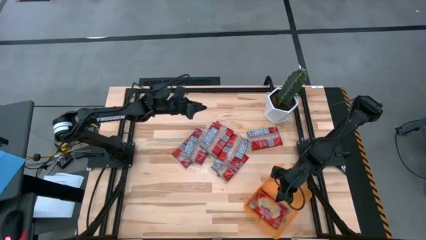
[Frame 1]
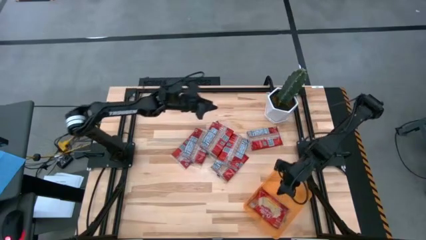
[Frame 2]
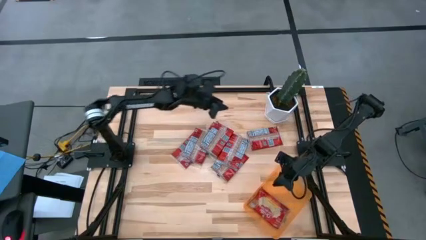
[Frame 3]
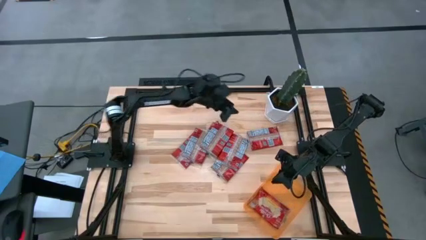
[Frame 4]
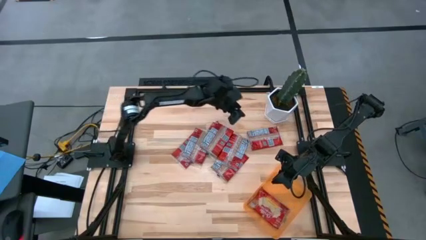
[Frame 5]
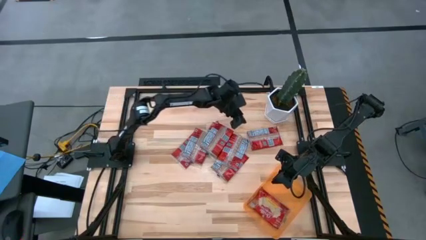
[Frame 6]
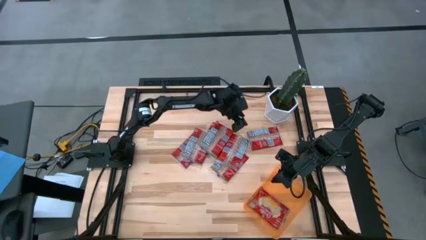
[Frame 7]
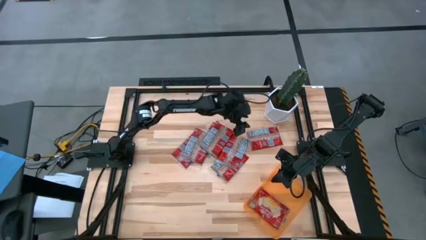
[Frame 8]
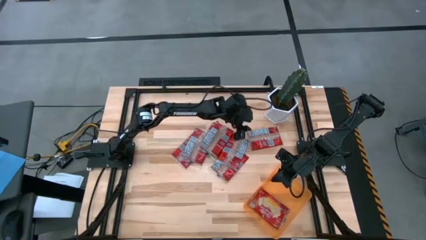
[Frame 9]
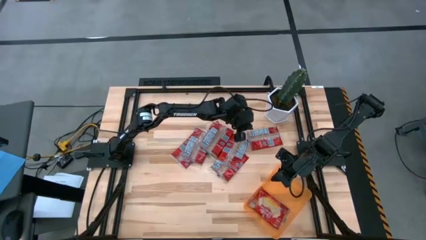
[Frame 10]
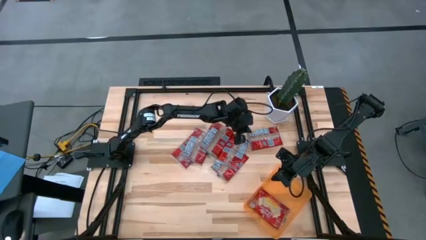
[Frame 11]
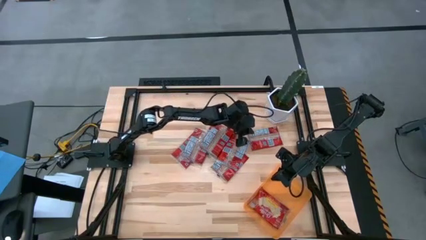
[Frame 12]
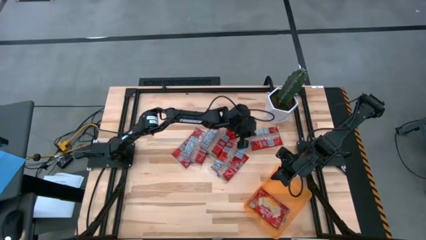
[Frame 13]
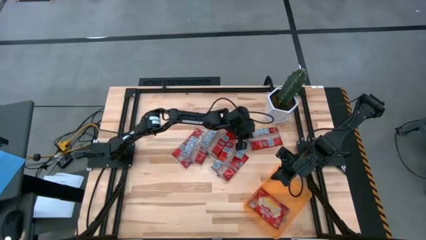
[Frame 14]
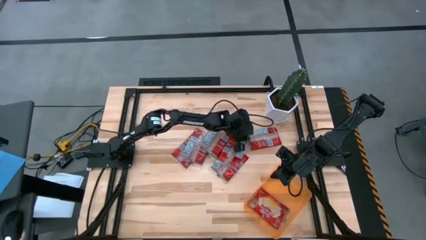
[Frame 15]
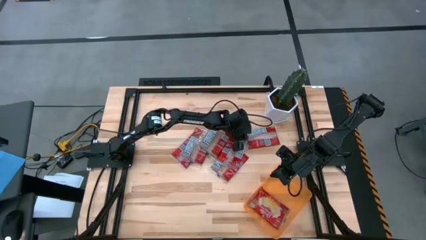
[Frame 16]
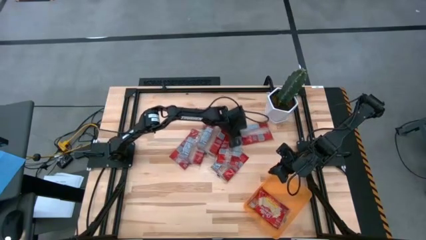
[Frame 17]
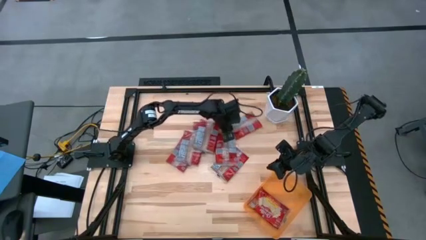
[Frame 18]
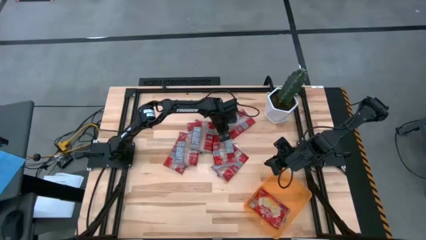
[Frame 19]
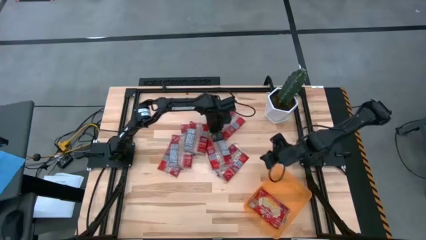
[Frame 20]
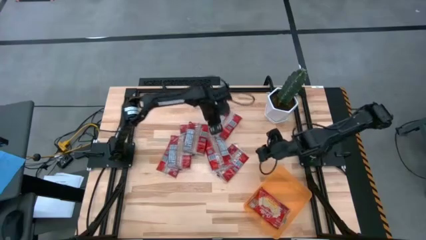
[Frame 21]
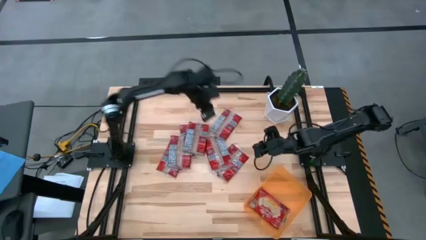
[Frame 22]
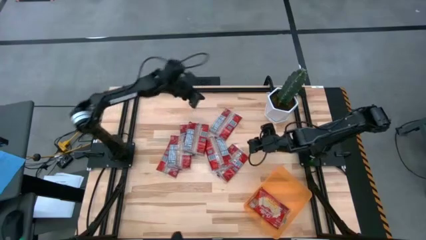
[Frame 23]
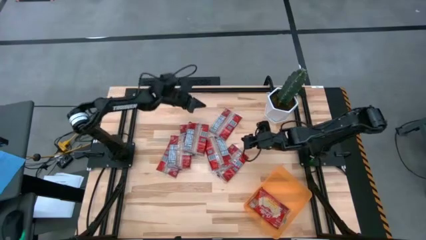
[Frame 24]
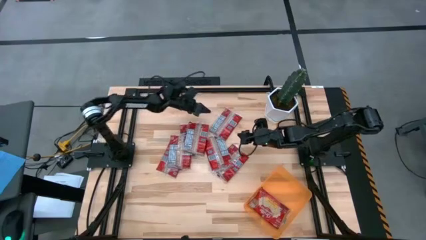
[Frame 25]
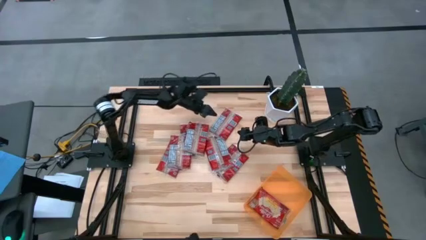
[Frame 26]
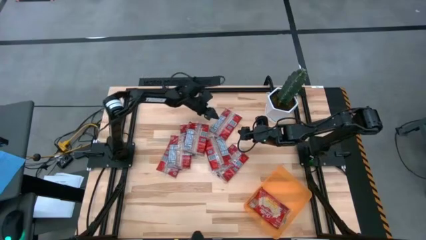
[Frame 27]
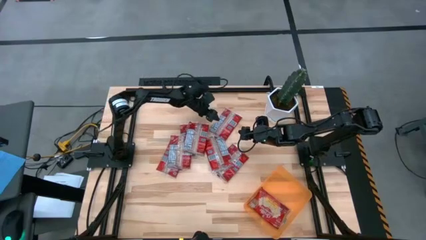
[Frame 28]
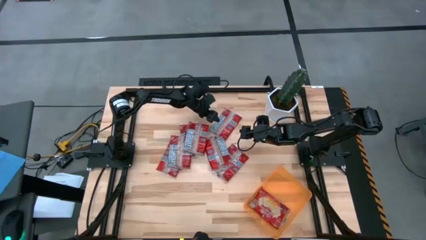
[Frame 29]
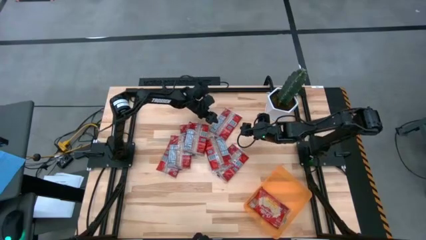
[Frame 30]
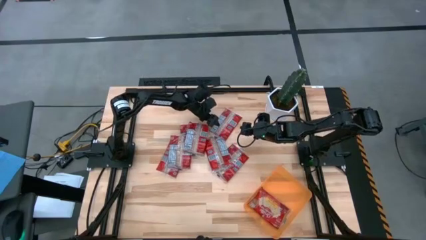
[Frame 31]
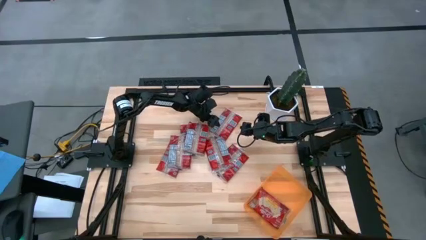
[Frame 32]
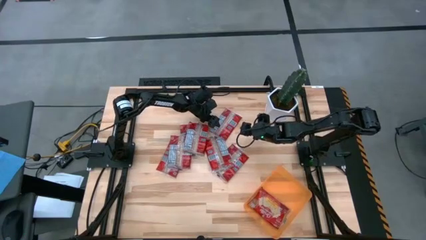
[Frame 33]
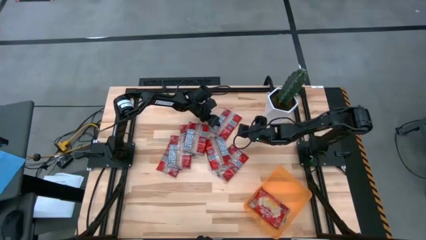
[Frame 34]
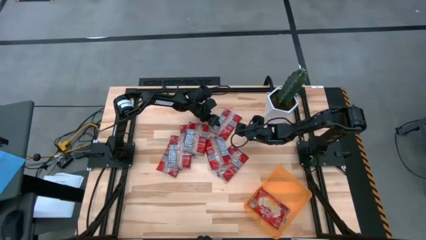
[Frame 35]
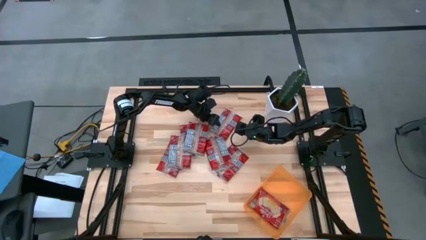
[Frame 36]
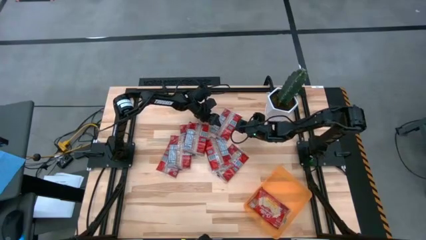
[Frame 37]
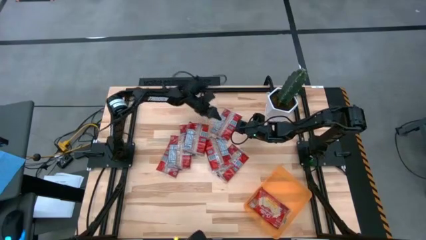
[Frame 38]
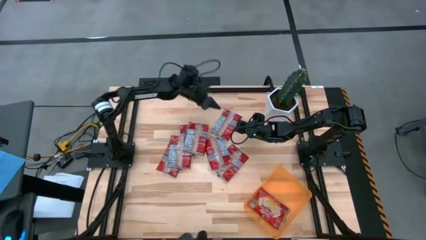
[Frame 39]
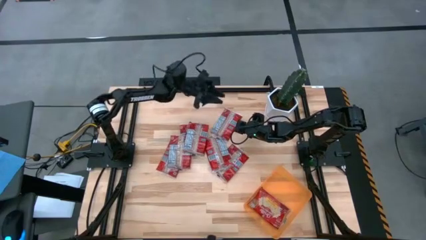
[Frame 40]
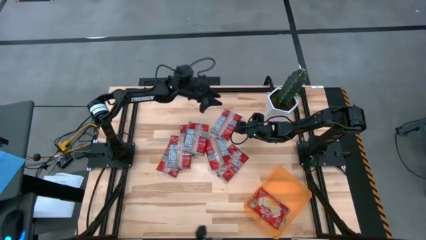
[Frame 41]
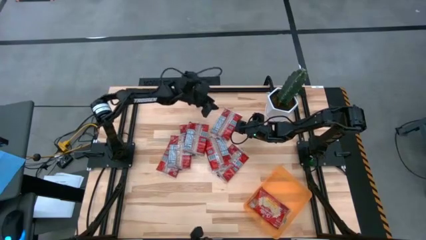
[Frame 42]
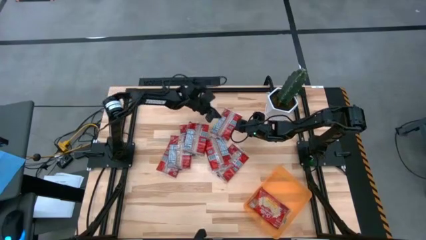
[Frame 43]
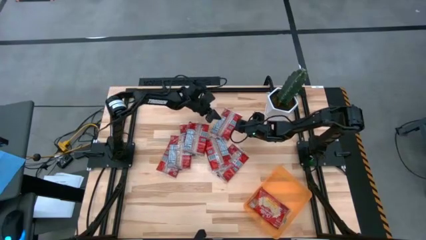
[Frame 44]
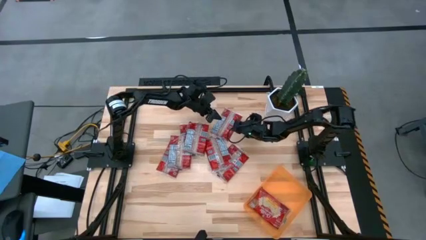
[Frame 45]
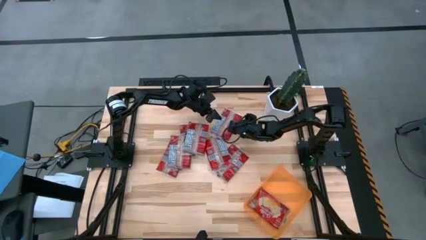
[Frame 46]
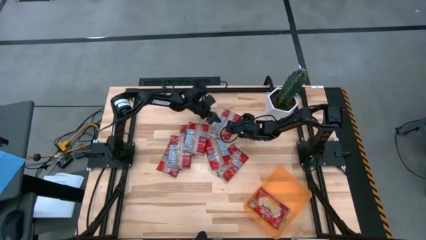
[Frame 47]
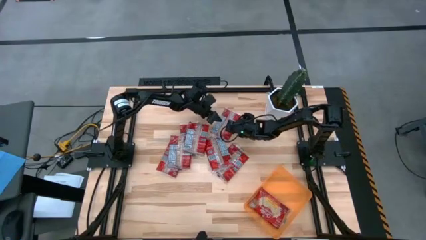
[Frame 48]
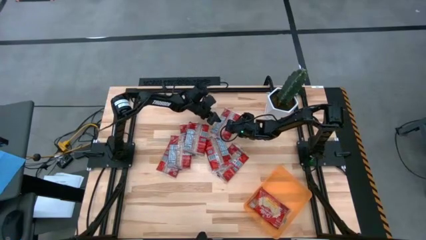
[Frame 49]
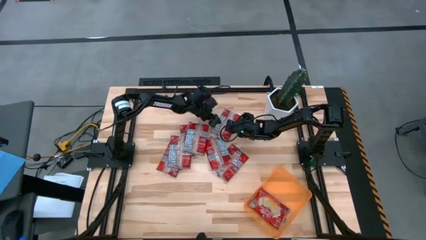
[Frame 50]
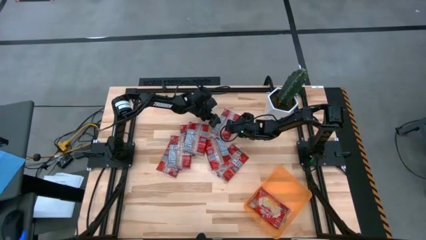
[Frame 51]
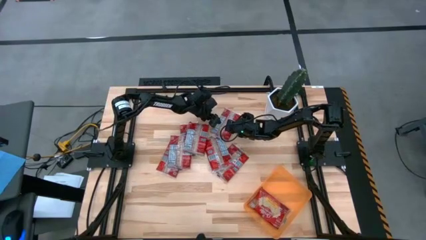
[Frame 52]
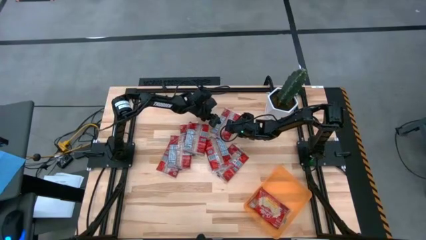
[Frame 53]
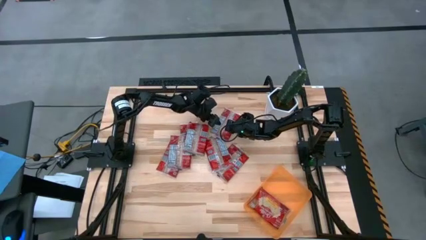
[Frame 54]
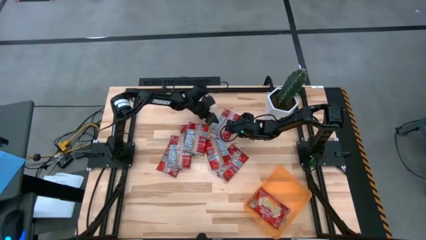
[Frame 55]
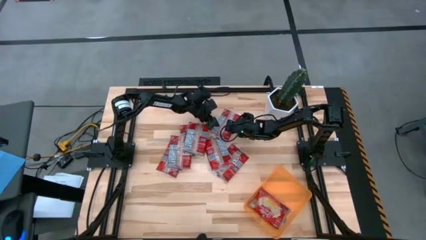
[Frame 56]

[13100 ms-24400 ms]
Task: Sort popcorn bags into baskets
Put the red popcorn bag into the orange bin

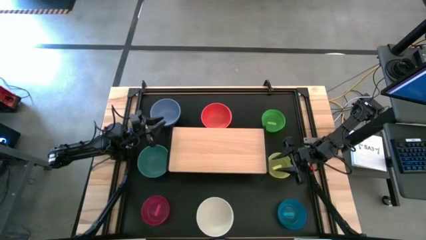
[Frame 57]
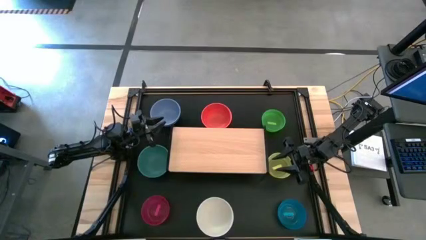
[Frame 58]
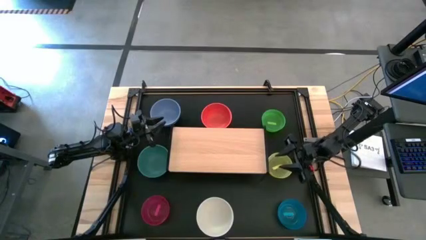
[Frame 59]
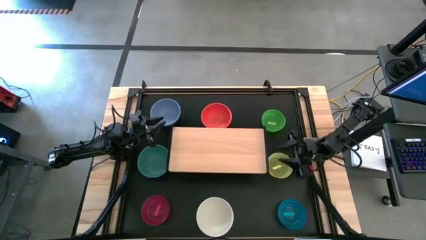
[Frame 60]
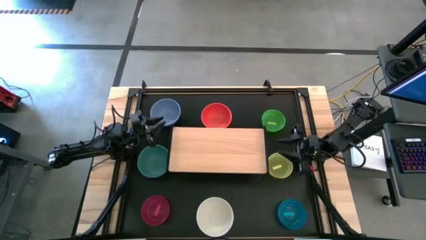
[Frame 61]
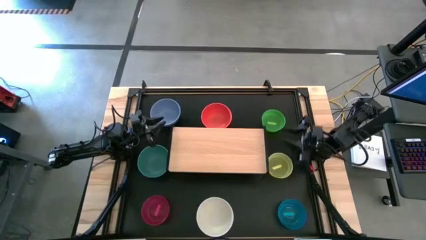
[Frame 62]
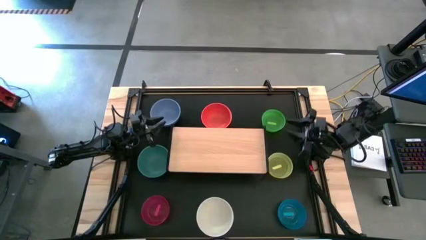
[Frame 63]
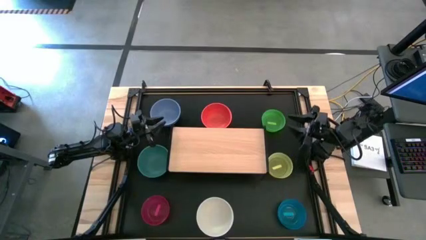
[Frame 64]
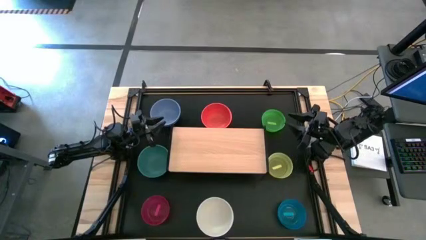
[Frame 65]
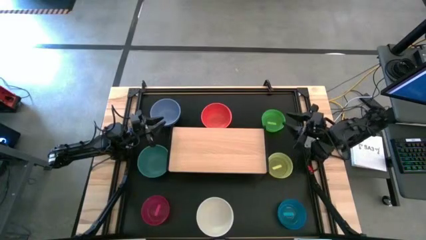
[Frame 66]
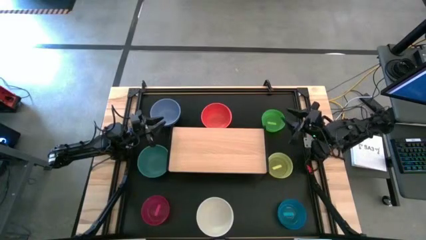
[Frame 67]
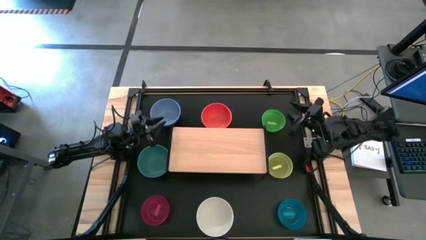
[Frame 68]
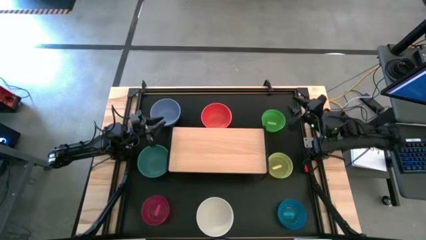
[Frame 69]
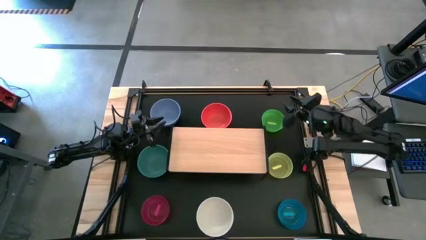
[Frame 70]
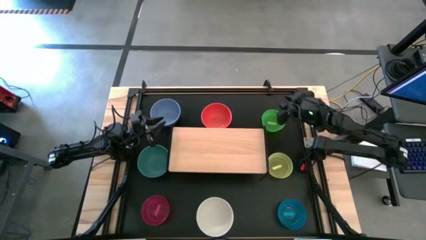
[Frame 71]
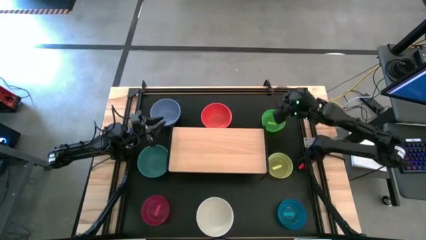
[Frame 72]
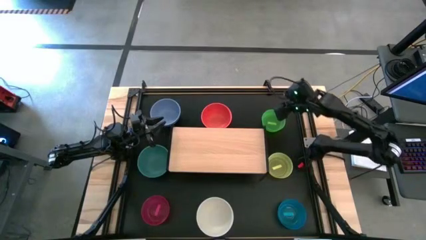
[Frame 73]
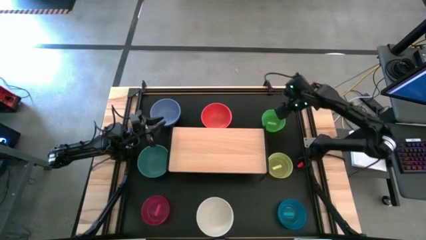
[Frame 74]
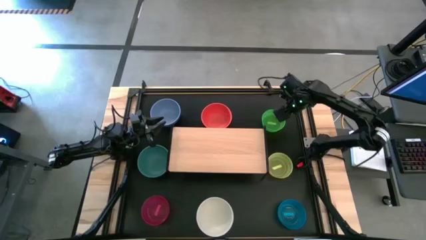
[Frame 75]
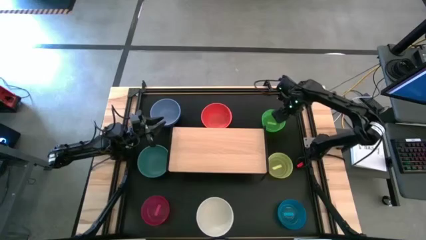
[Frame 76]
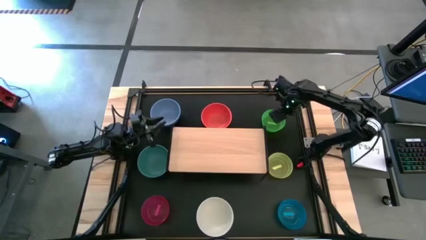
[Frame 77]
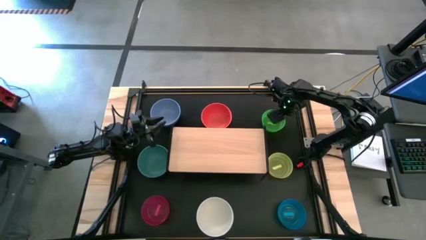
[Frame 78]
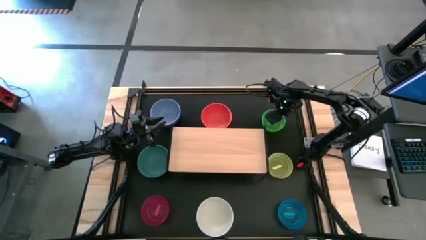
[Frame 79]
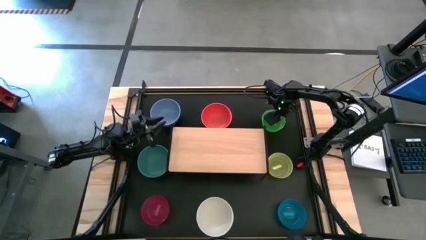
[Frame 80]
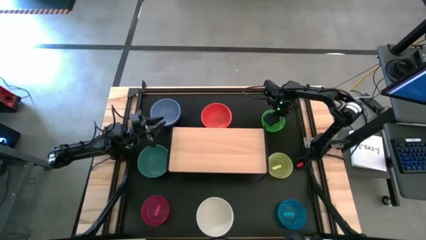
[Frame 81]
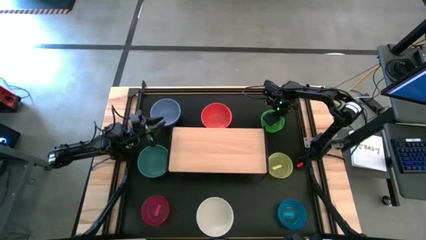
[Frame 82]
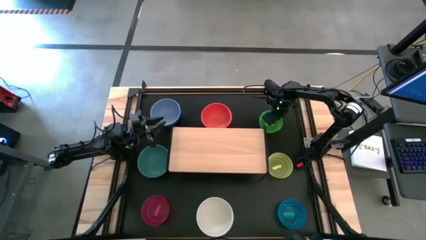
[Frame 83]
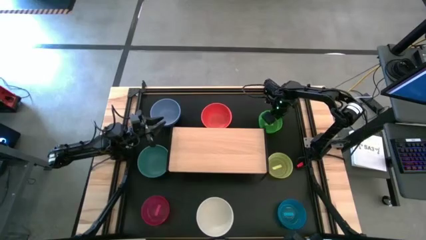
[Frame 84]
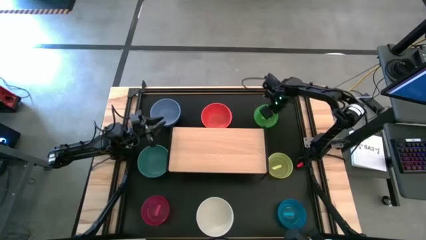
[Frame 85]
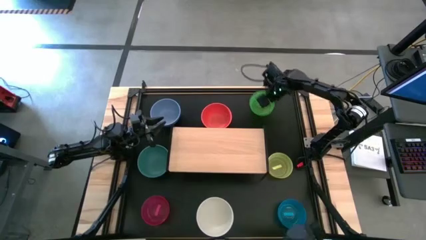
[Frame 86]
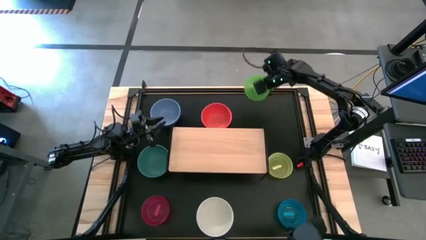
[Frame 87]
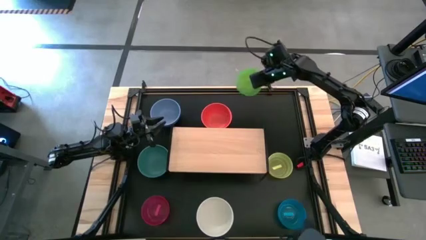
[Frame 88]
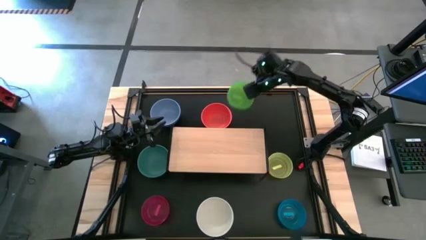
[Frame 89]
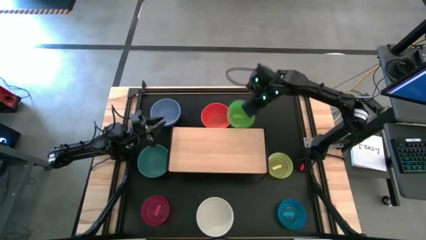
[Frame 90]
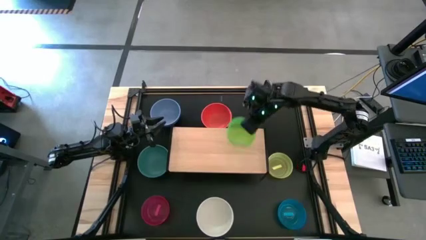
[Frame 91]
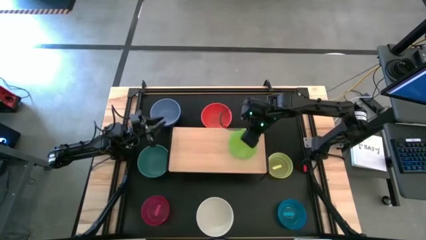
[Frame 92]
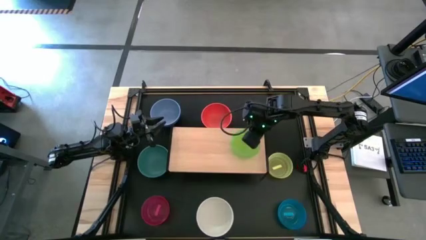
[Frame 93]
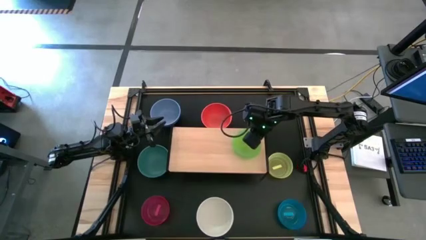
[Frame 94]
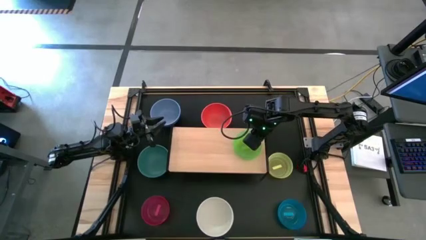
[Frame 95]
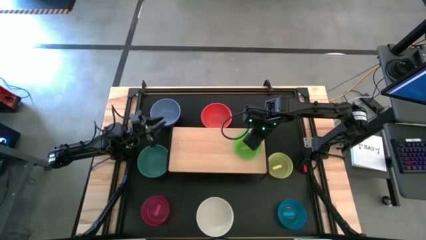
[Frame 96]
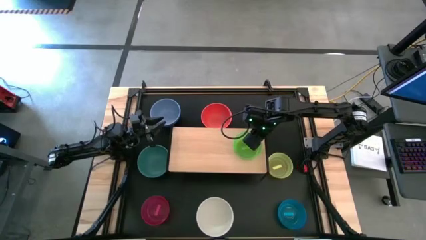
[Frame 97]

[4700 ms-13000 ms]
Task: Place and stack bowls onto a shelf
Put the small green bowl on the shelf
